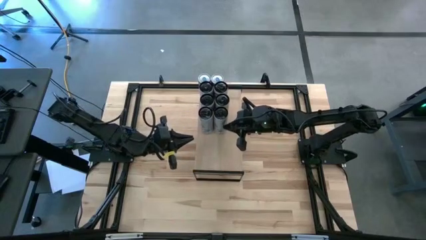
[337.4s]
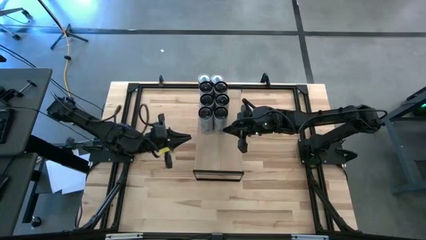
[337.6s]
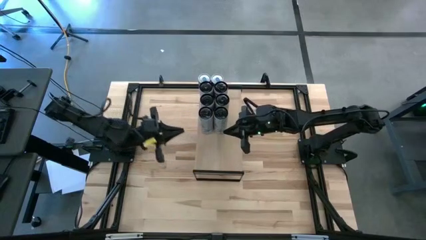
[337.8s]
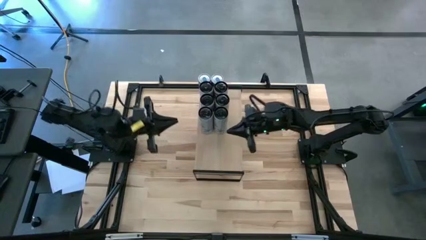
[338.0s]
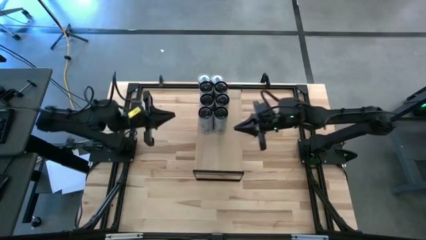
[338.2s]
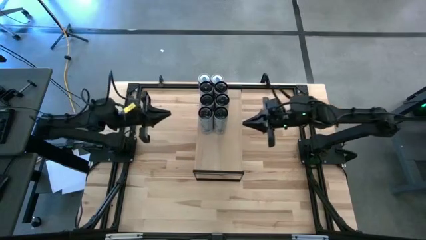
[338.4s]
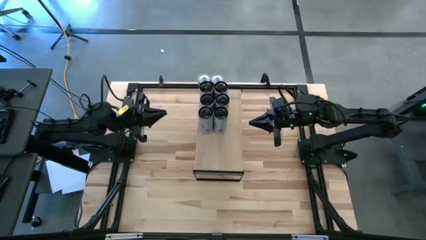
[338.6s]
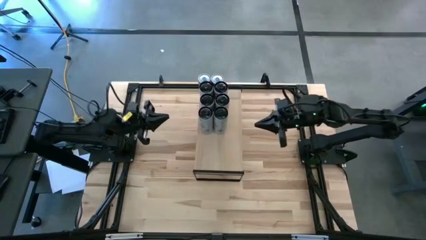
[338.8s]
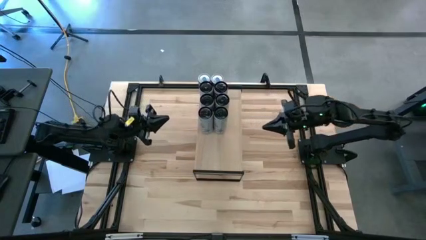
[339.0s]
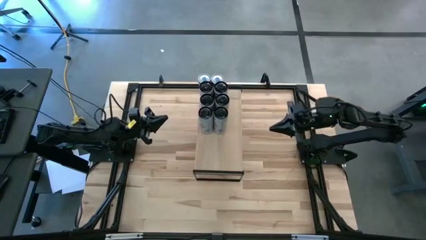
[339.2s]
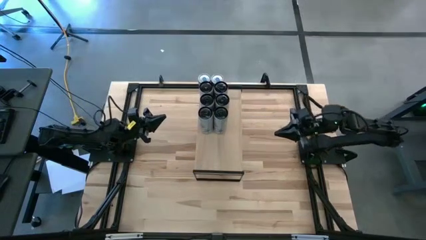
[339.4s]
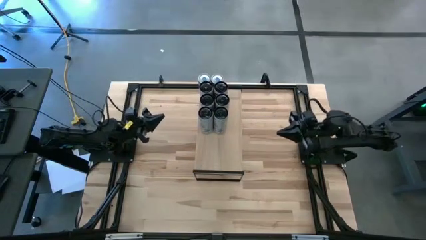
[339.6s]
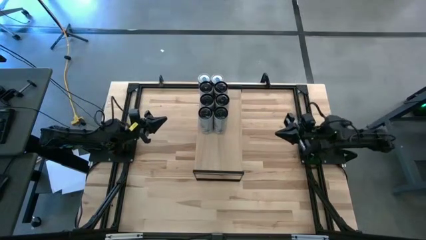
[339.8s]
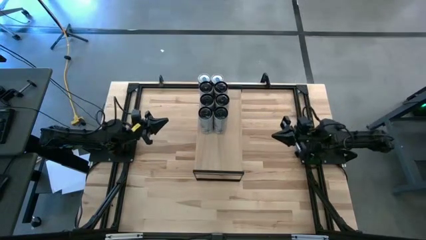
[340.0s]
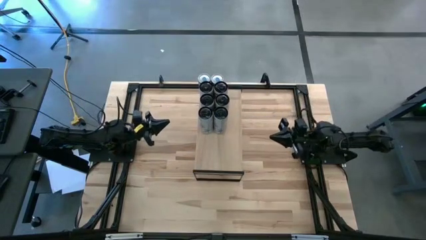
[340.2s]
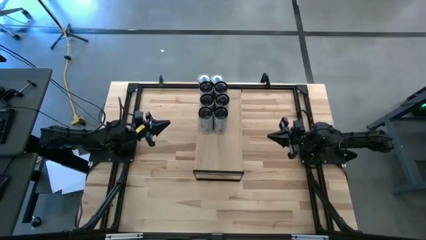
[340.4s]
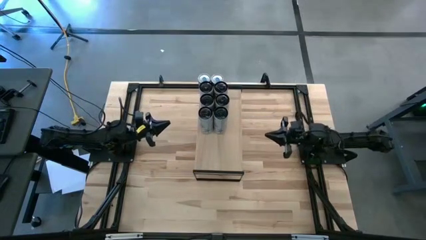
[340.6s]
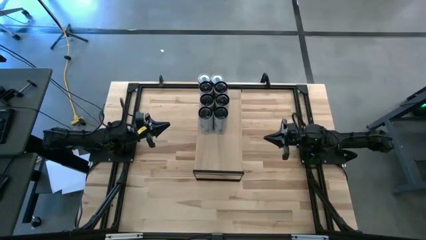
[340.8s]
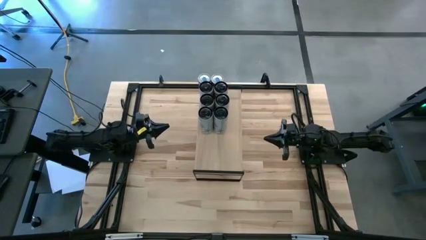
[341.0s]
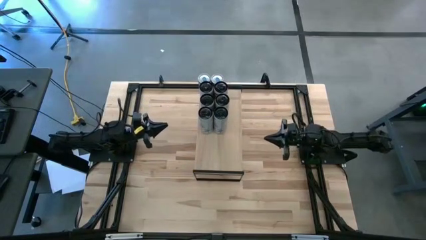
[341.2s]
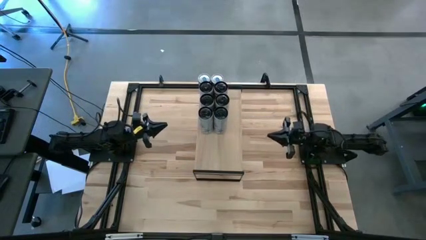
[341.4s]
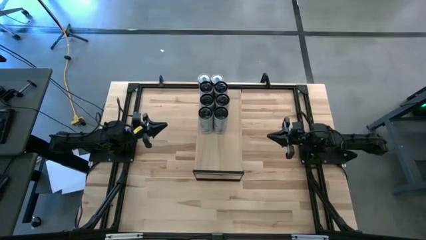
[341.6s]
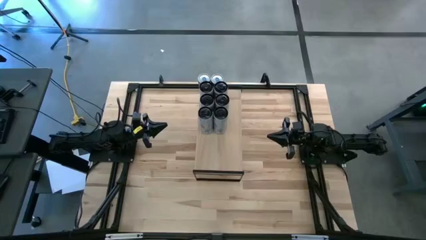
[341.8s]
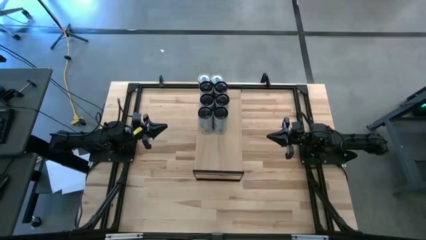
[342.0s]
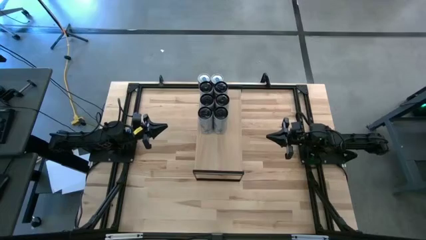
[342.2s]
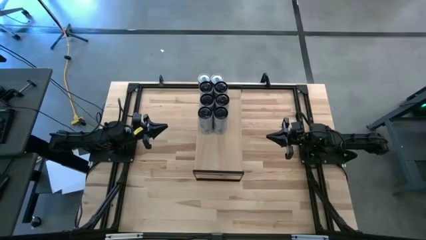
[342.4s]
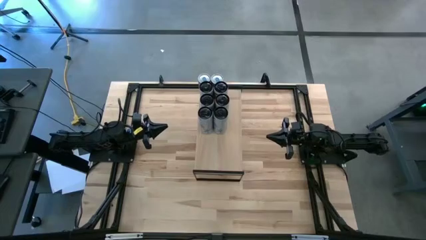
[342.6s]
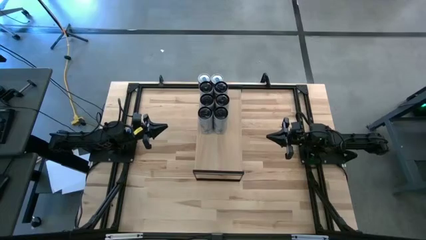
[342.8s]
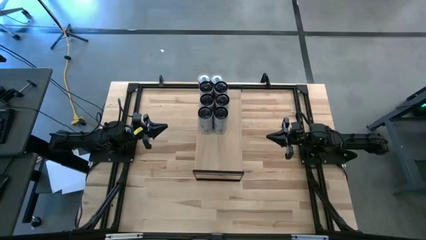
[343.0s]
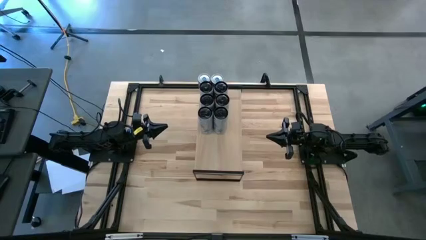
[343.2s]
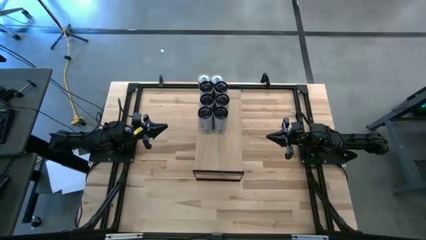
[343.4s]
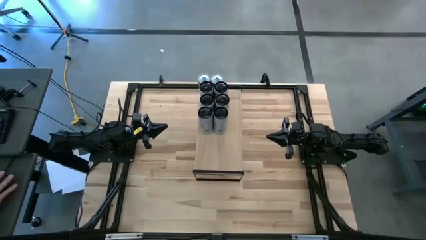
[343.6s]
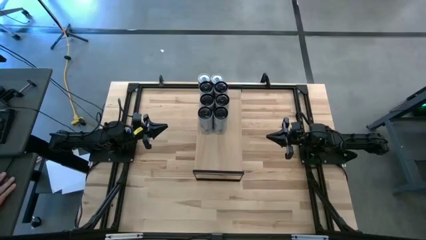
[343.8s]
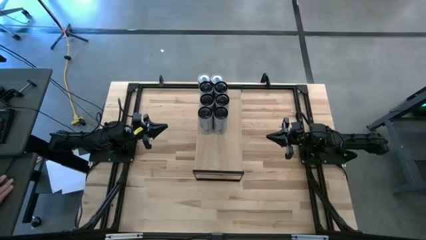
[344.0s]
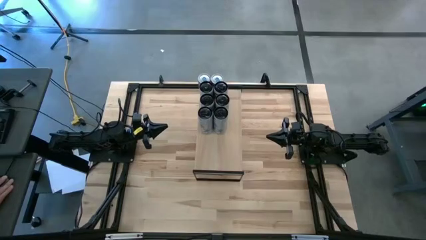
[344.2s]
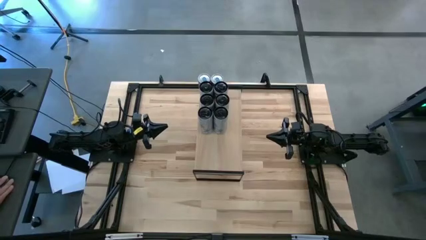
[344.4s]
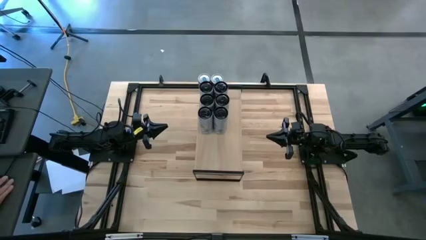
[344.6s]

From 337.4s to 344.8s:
Task: Place canned beverage on shelf
Return to Home Position

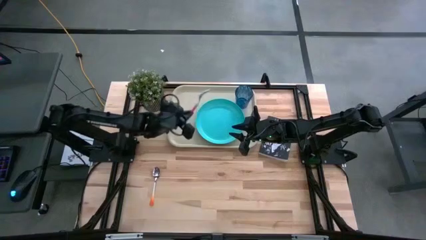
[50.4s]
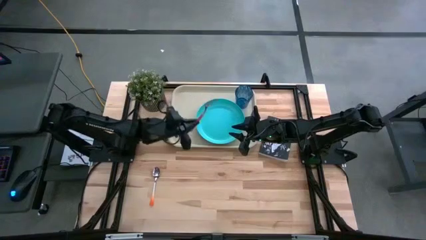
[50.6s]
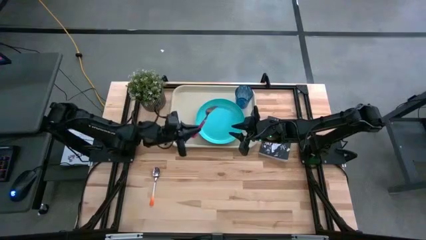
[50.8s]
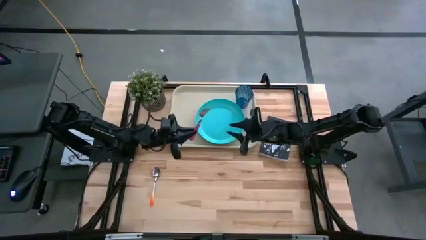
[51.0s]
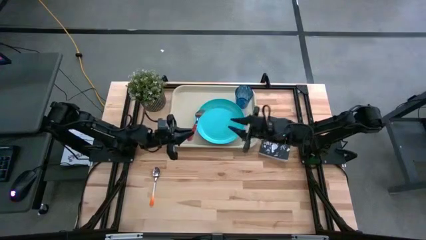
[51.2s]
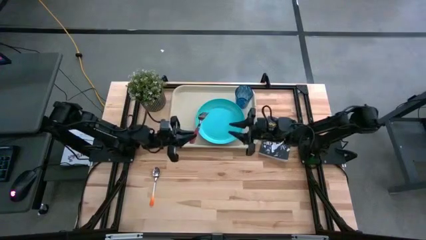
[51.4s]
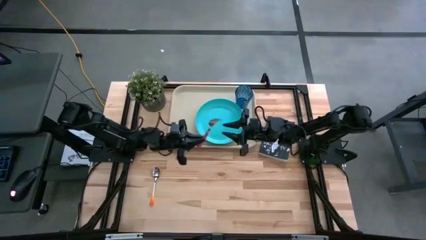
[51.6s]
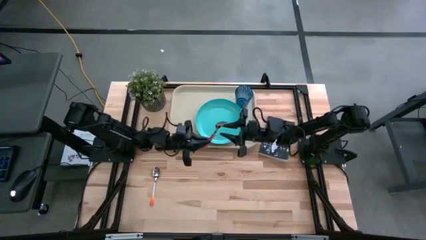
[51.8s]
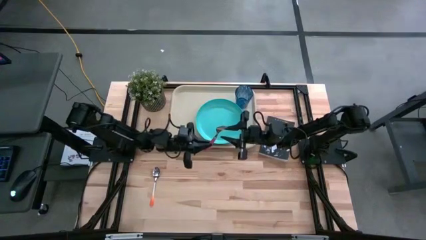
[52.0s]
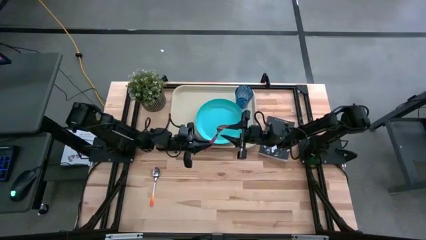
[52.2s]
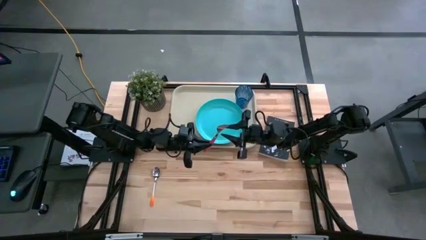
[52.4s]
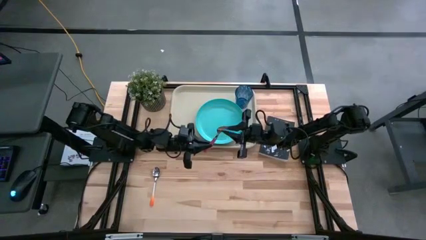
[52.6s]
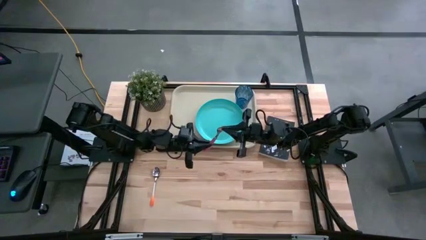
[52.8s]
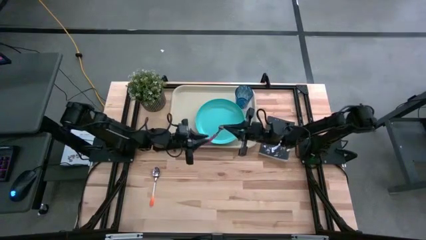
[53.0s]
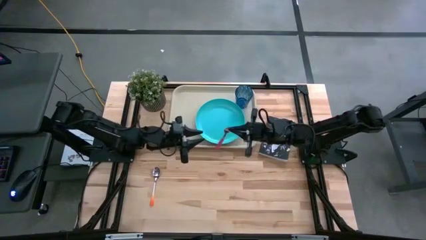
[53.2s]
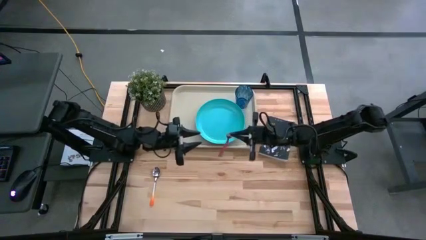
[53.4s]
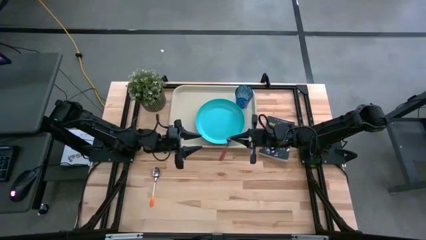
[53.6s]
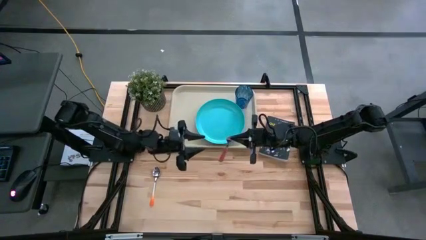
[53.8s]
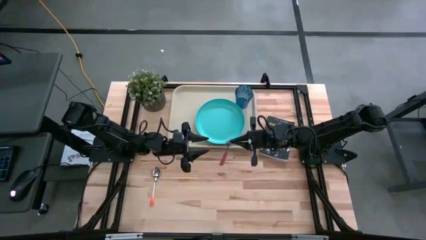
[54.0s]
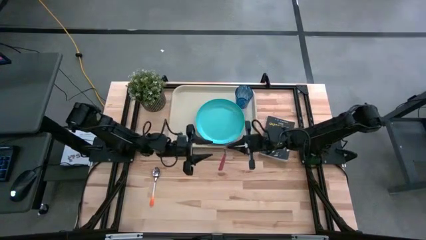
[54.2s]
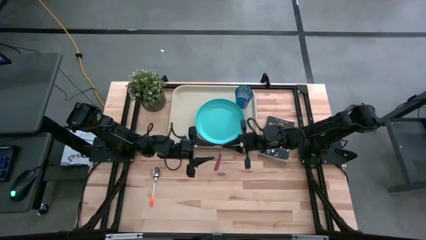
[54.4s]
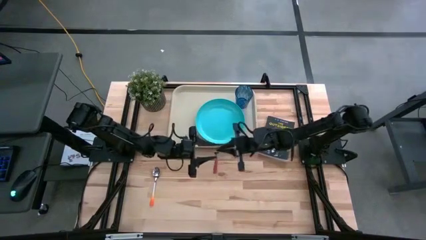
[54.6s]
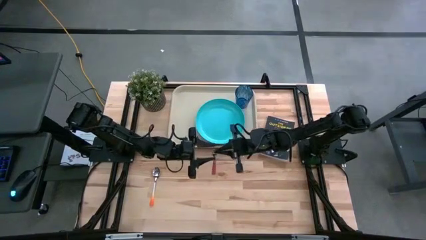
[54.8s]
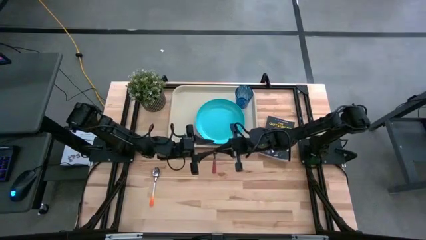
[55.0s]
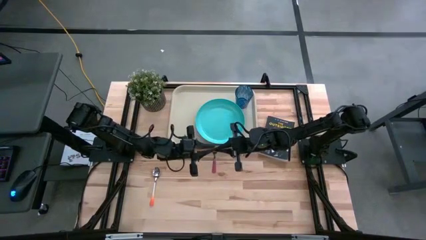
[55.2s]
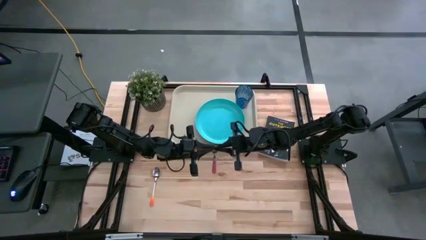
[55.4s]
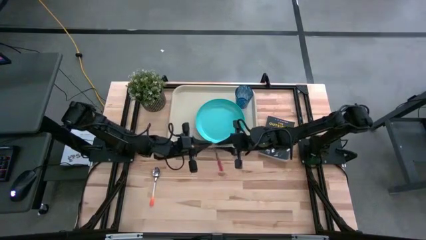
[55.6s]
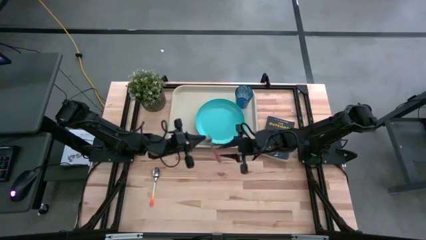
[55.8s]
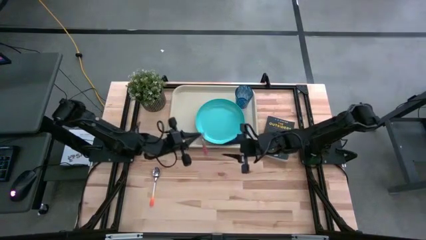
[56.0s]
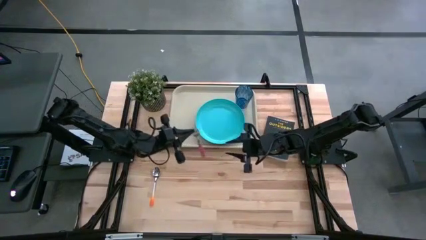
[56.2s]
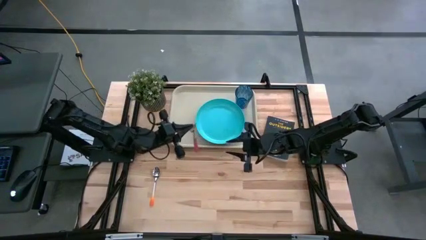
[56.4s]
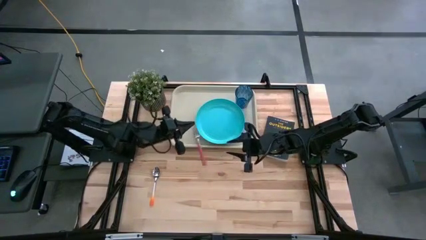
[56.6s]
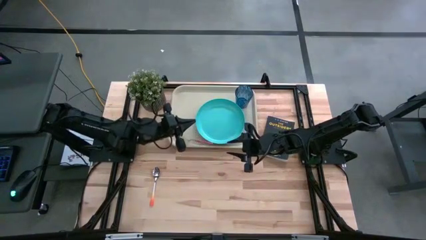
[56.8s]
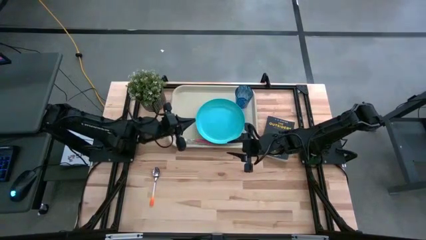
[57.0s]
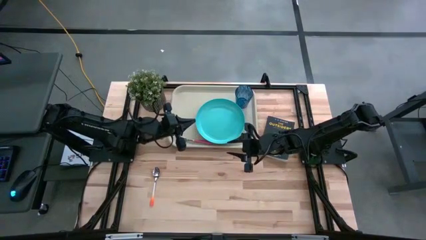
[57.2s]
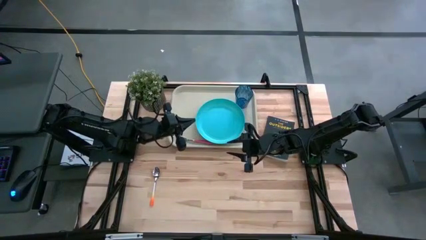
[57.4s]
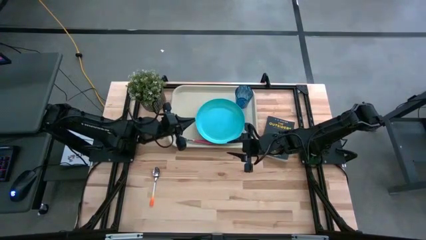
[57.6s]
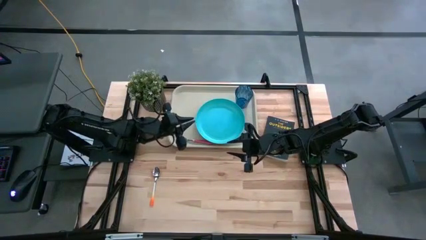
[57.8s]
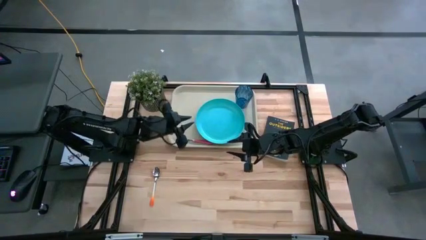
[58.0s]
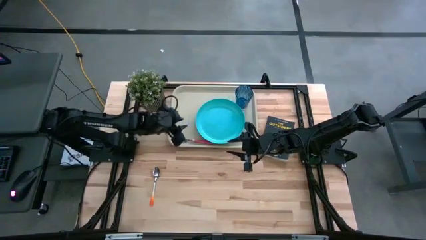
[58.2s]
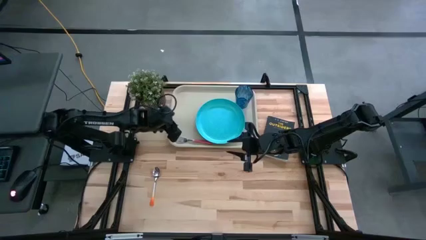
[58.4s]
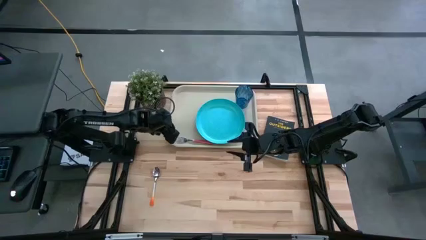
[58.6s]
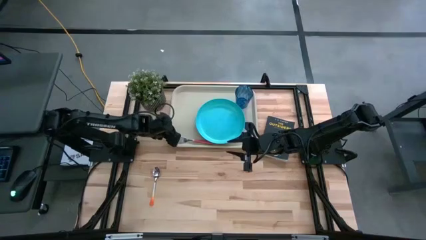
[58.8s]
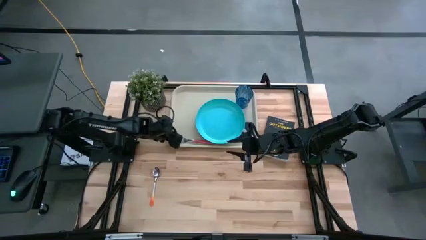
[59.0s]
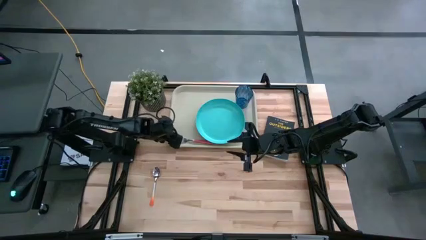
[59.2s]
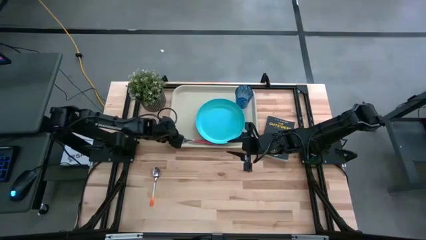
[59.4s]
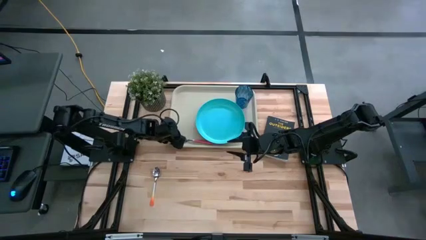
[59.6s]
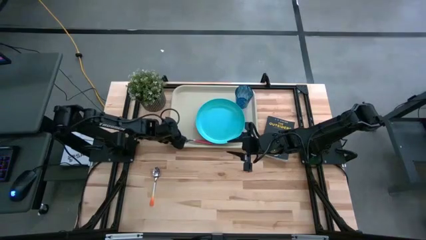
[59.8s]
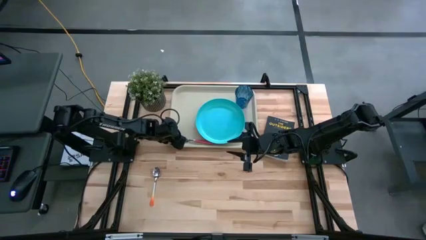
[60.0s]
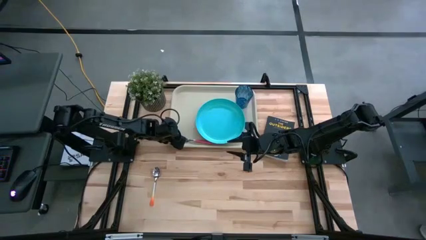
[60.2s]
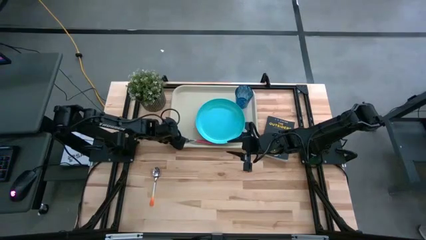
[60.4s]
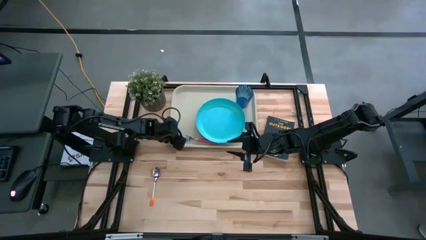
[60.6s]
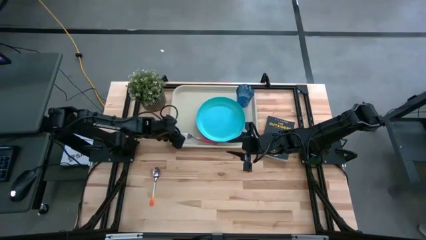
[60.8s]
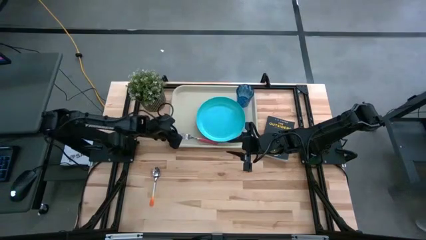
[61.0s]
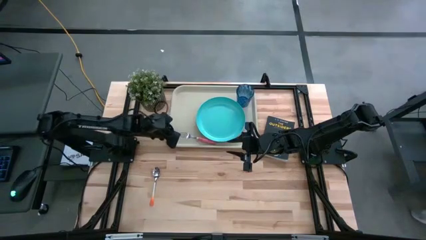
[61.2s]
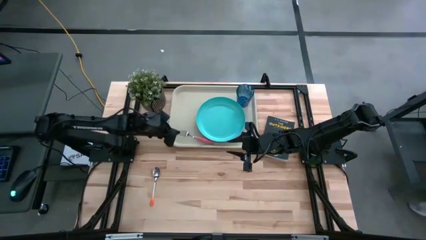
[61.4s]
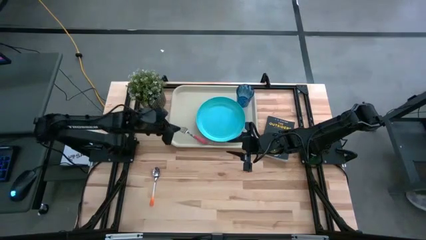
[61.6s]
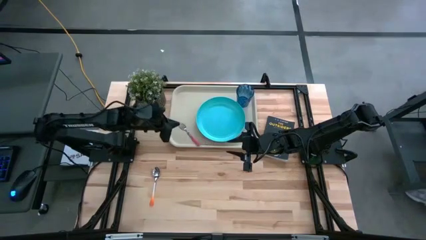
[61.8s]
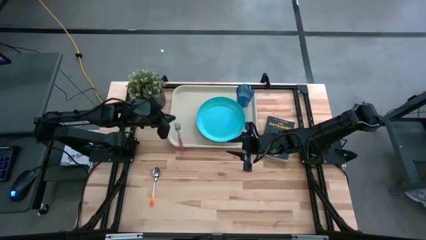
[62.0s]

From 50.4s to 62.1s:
Task: Pick and place plate/cup/fork/spoon on tray
Put the red fork on the white serving tray to the left of the blue plate
